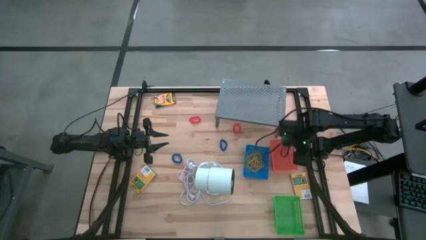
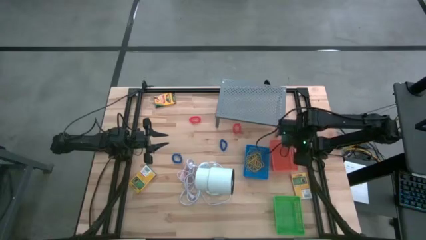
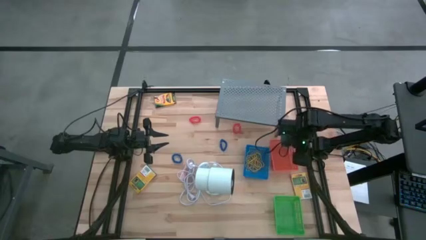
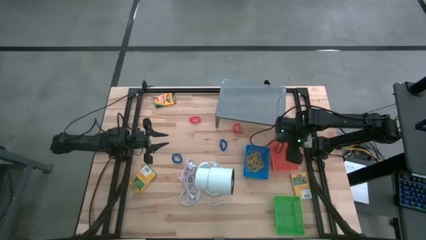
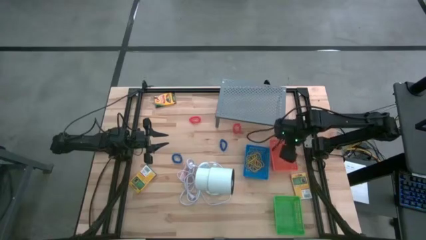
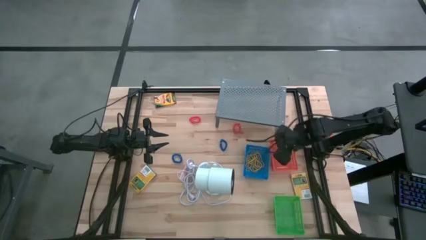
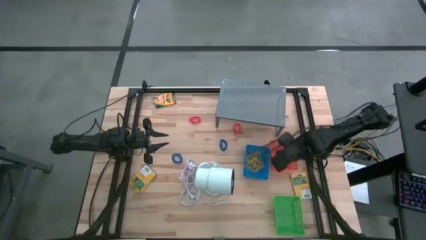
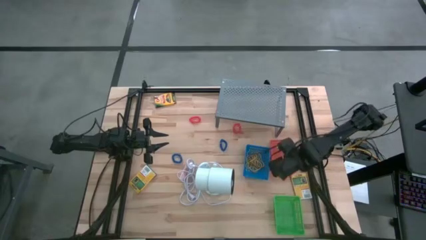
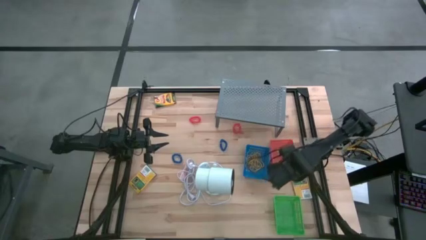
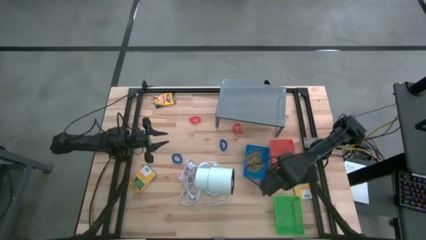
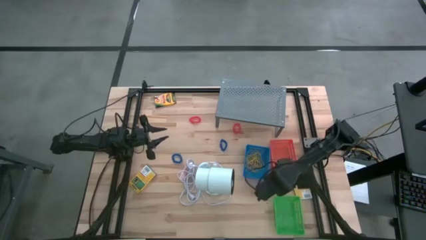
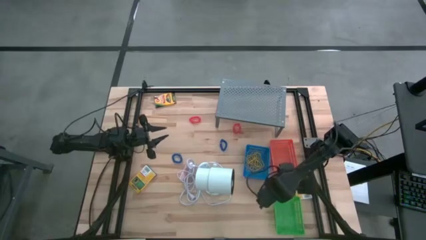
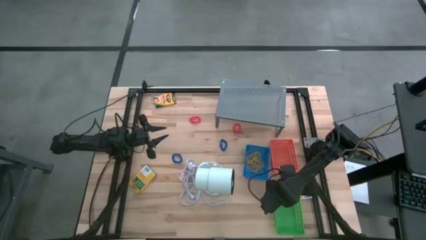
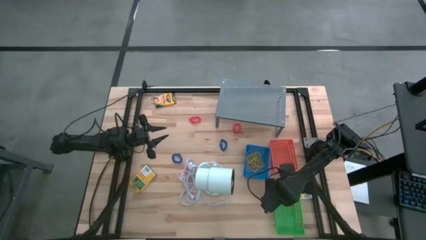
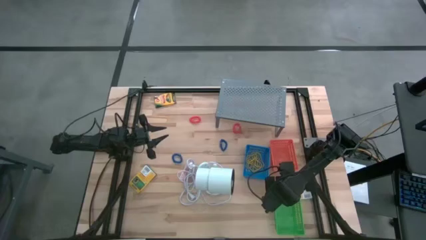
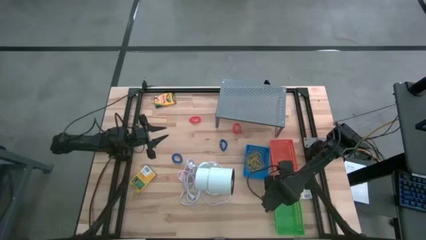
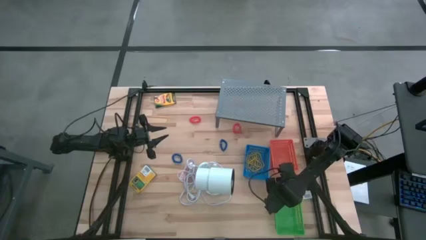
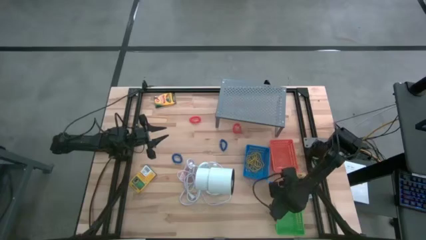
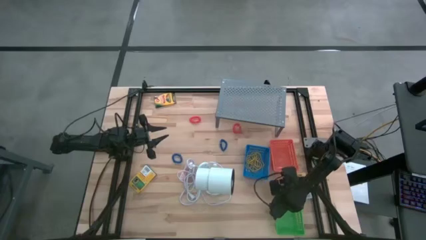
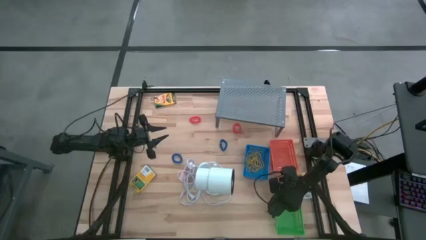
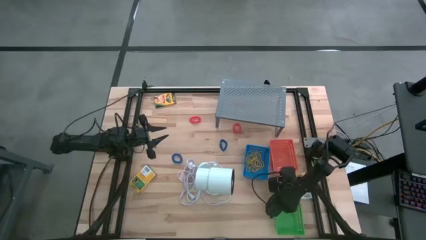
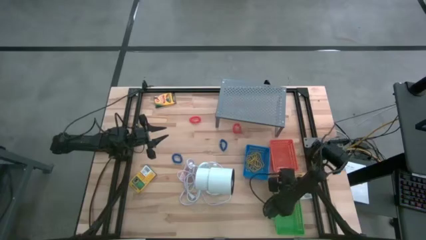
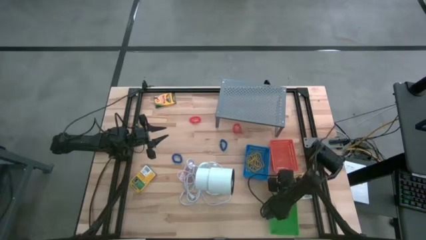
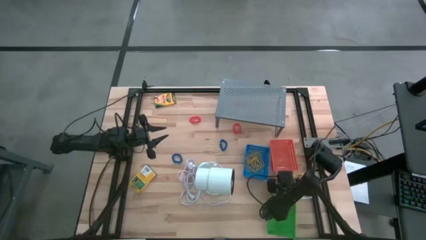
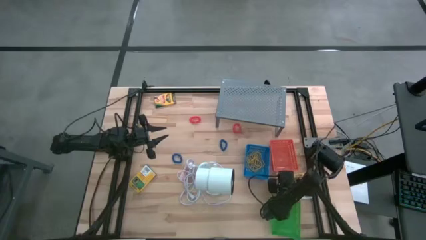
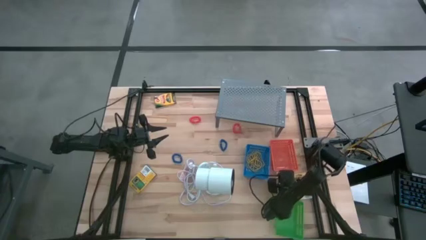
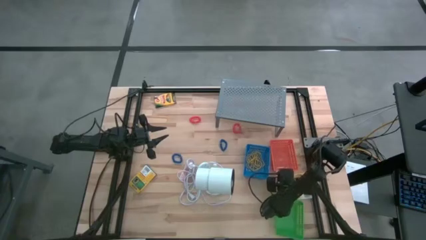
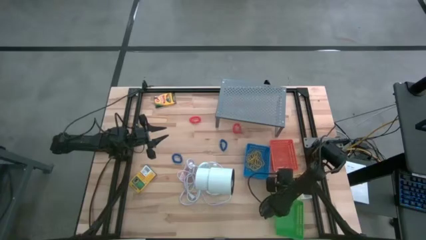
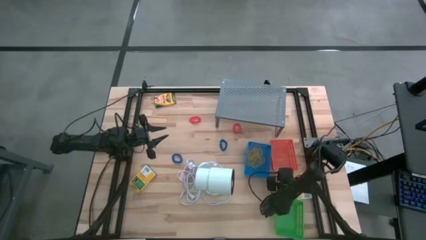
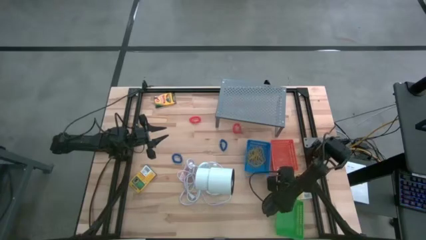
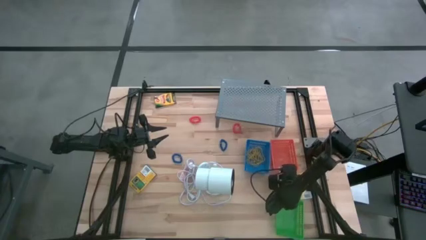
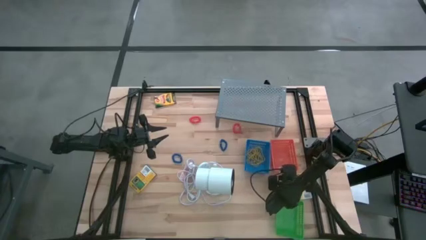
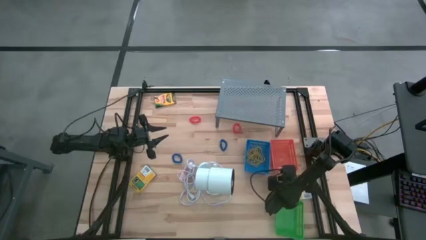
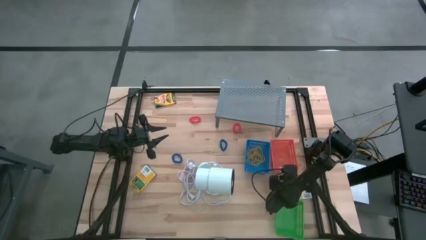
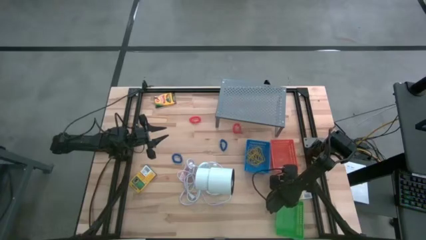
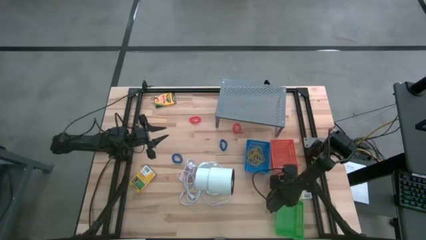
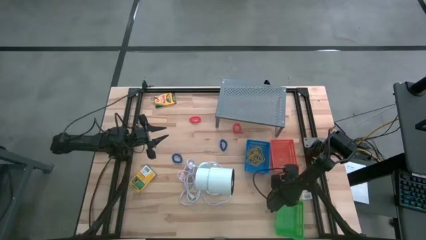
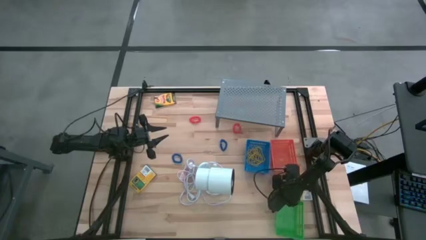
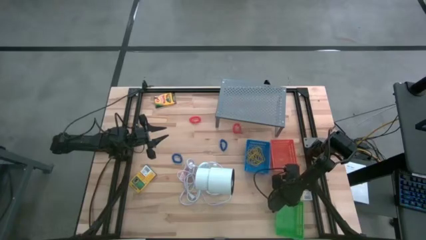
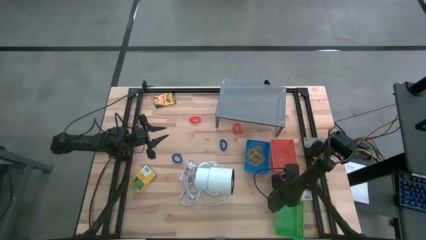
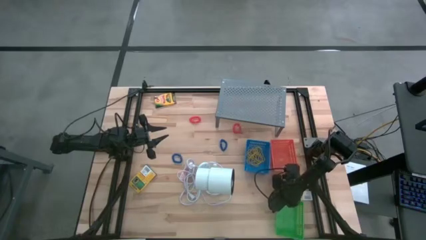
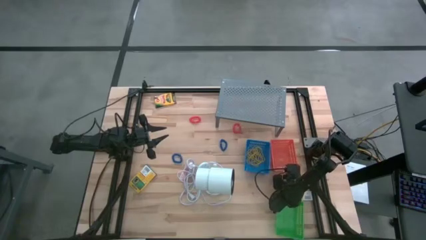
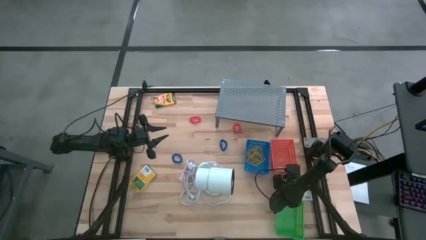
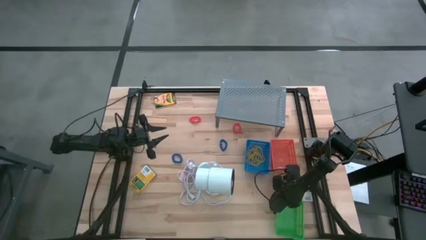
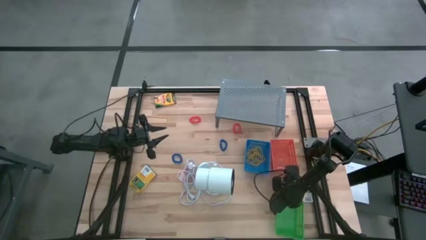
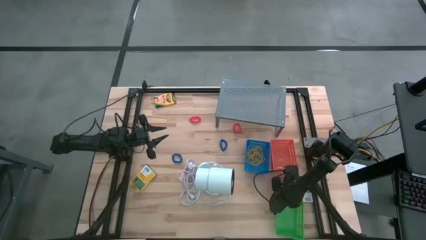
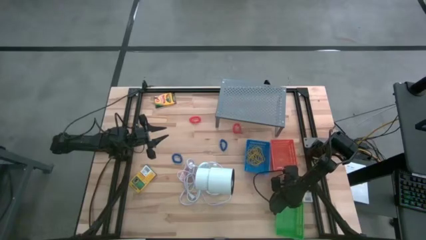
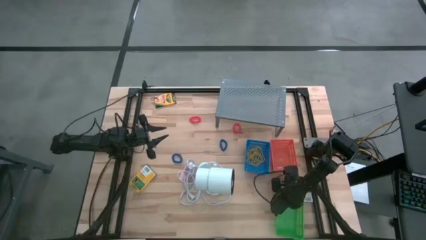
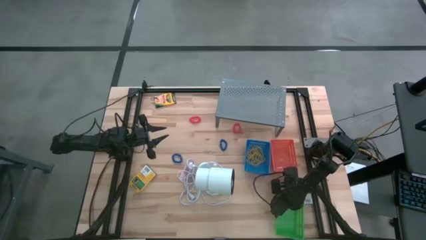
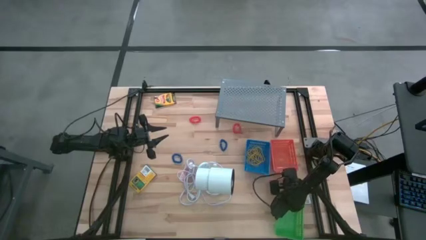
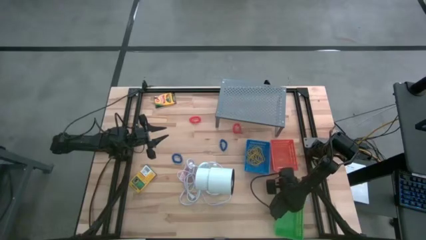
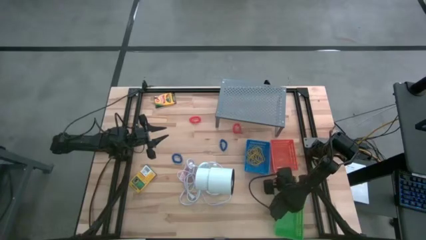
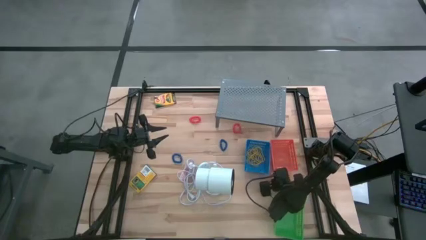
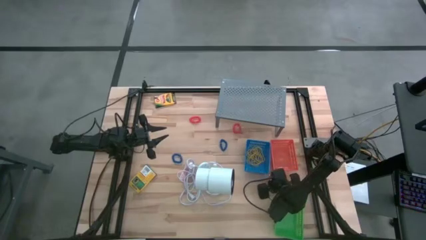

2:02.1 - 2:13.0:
Task: Pick & Place Office Desk Supplies
Put the yellow box of crayons into the orange bin

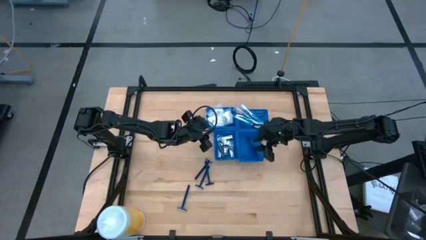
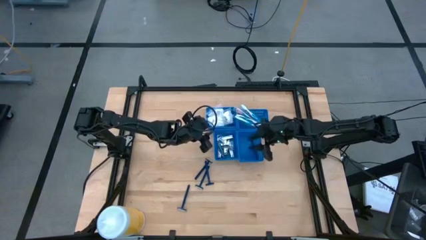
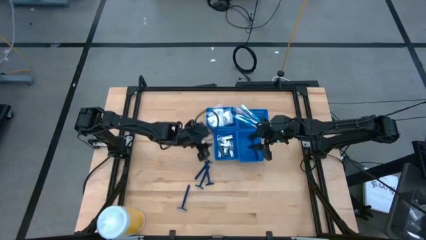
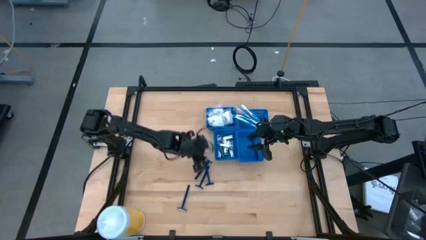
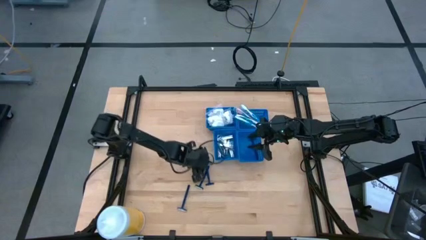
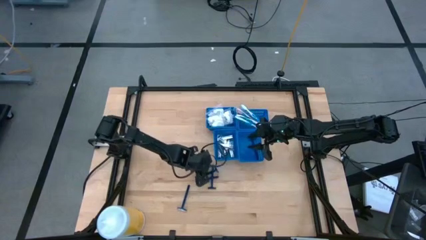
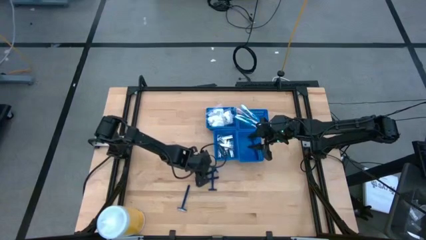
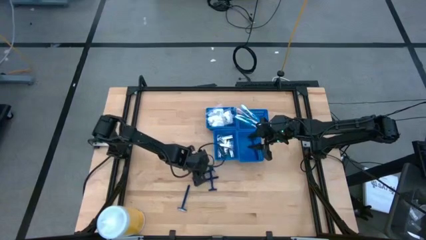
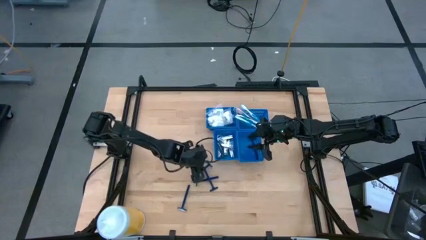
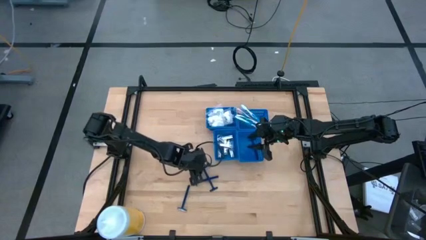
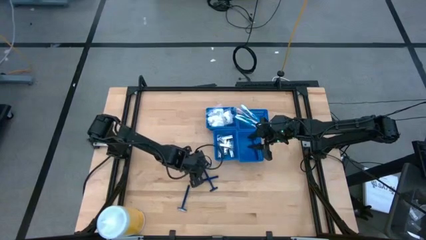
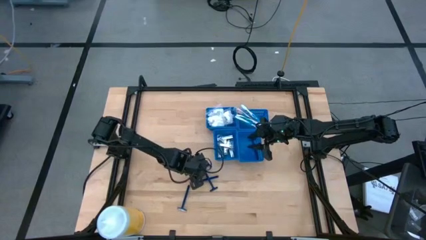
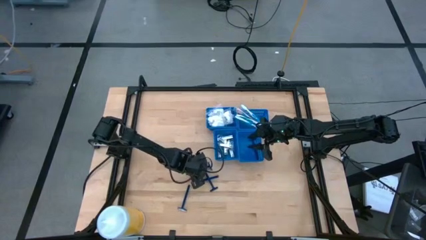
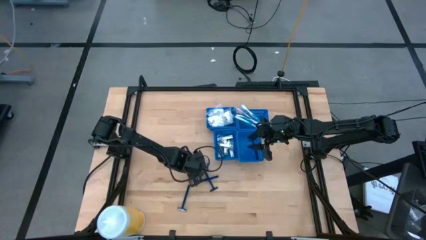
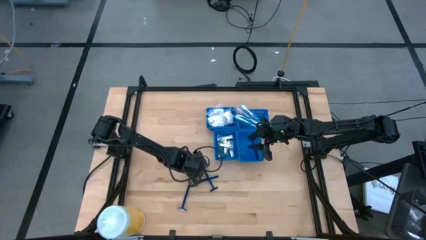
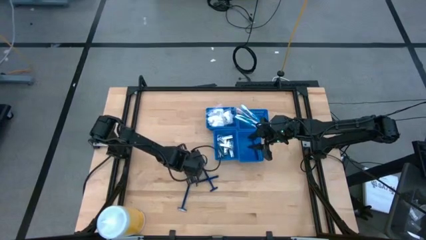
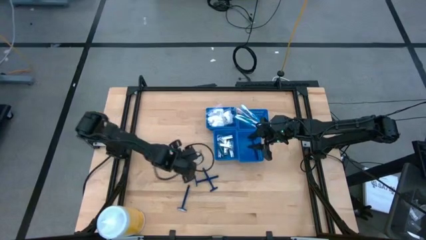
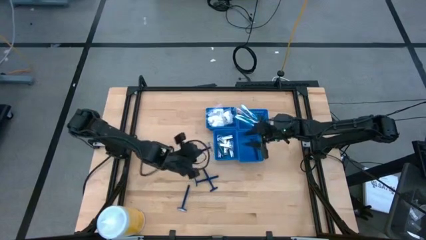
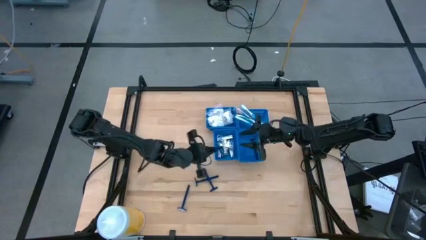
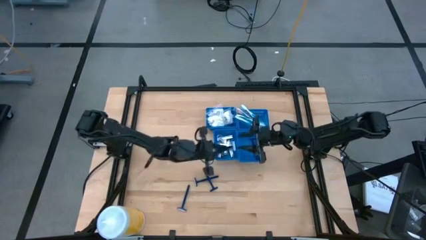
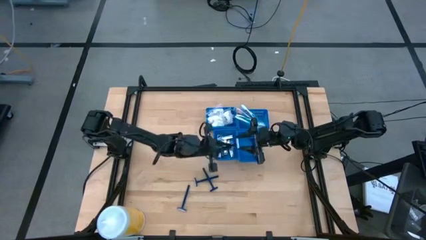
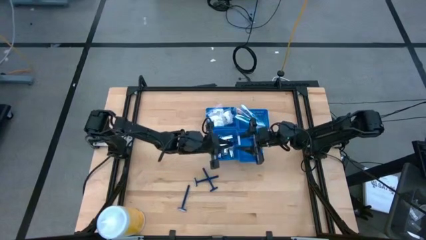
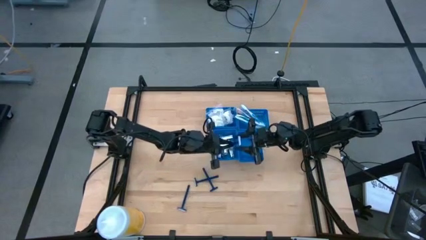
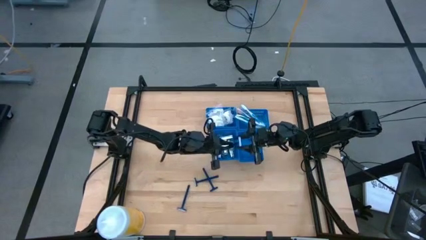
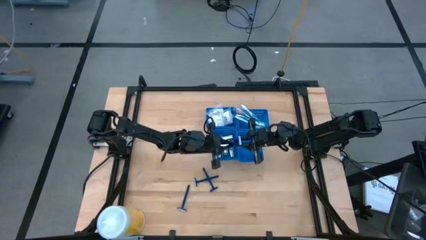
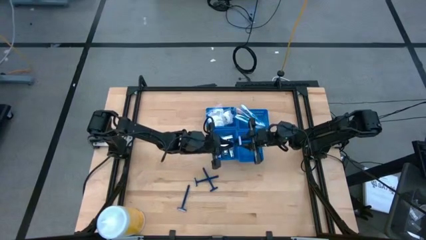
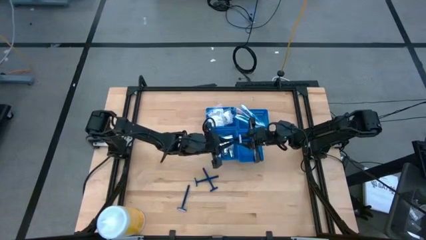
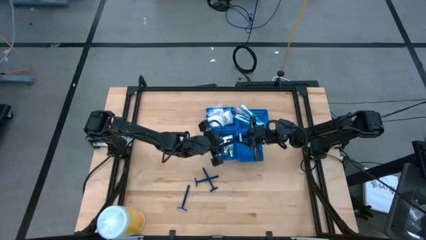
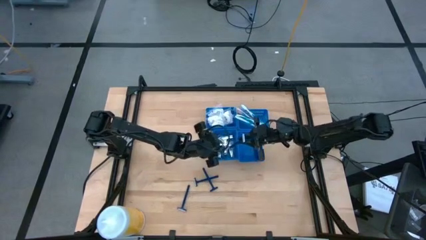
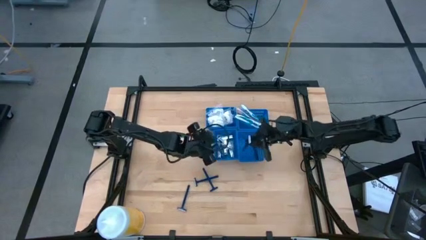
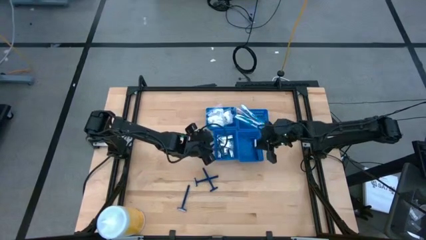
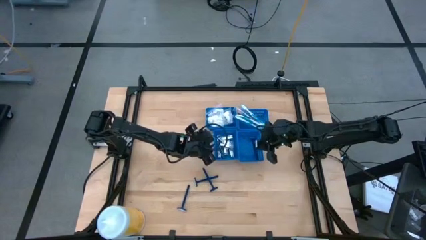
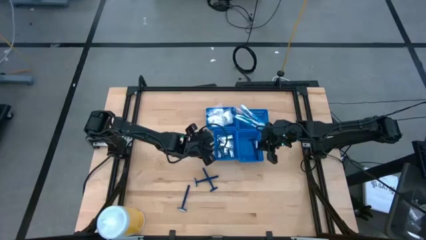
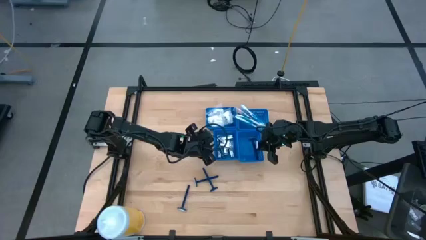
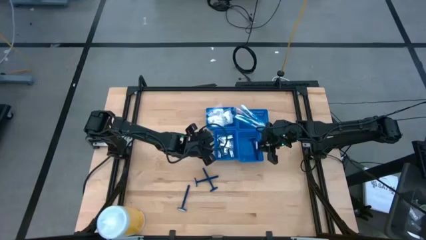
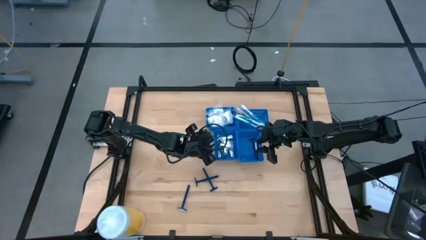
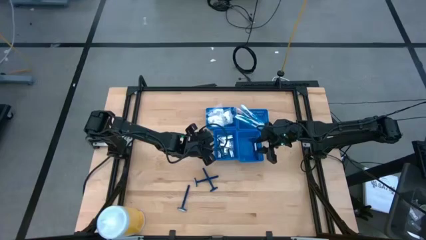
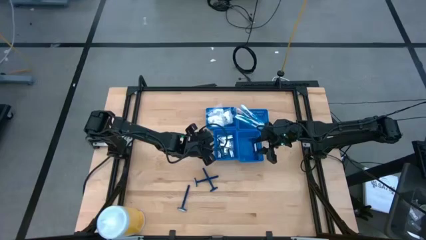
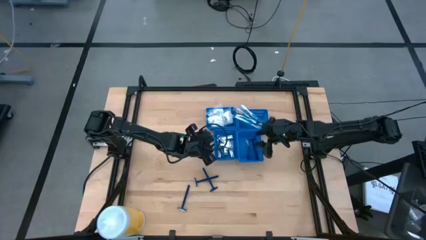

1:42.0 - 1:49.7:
Task: Pick & Place Travel size toiletries
Put the blue razor into the bottom right blue basket
